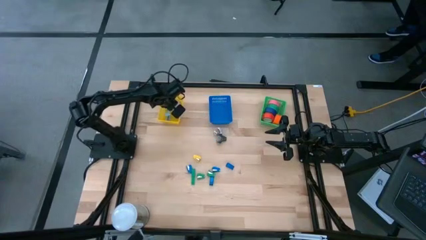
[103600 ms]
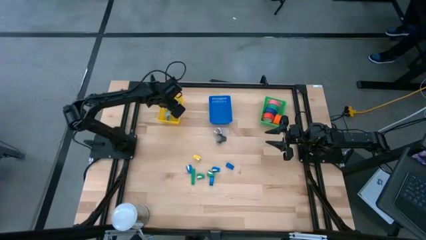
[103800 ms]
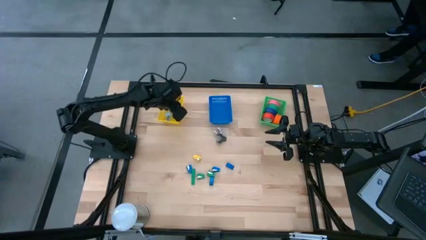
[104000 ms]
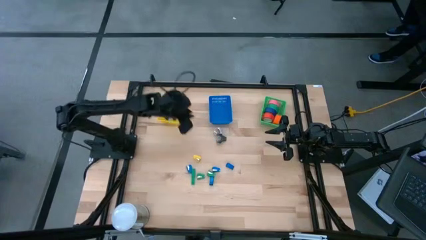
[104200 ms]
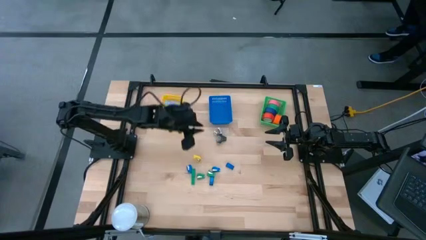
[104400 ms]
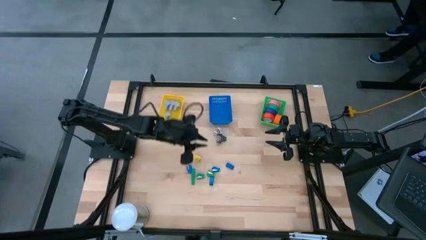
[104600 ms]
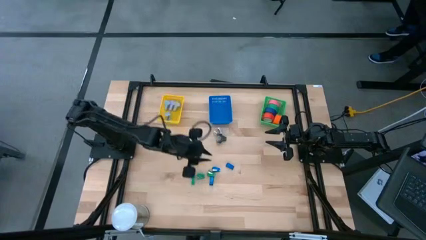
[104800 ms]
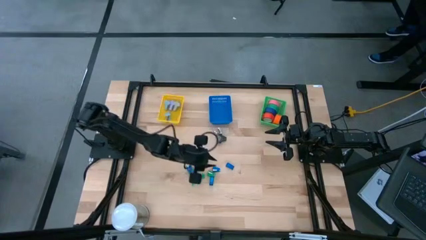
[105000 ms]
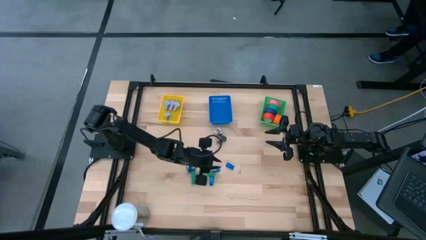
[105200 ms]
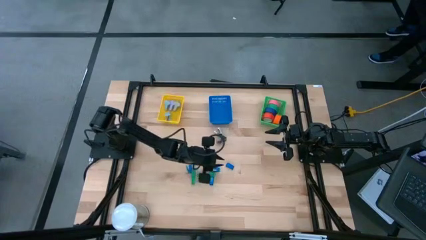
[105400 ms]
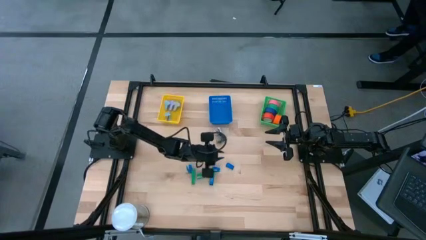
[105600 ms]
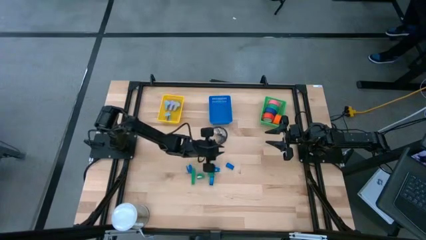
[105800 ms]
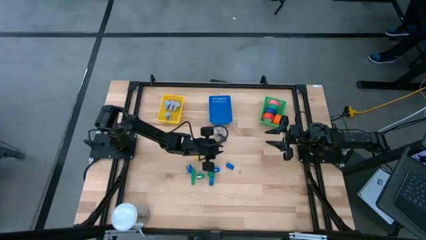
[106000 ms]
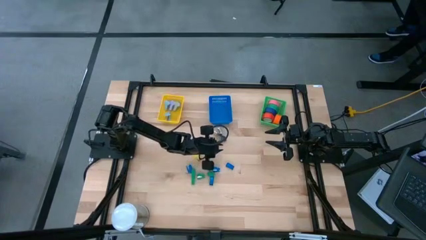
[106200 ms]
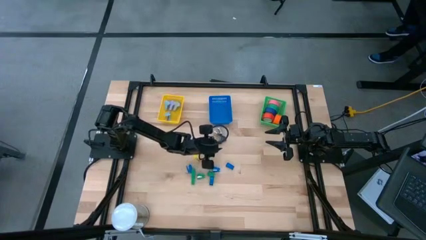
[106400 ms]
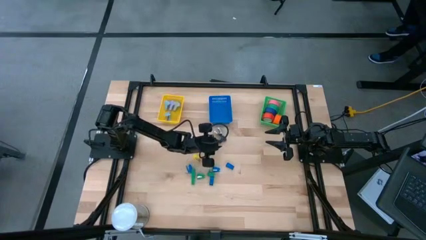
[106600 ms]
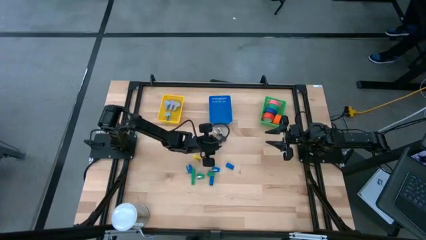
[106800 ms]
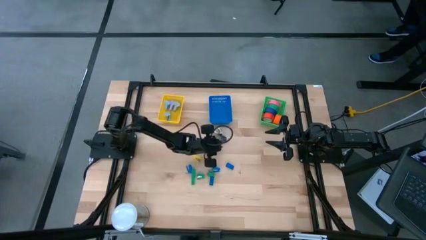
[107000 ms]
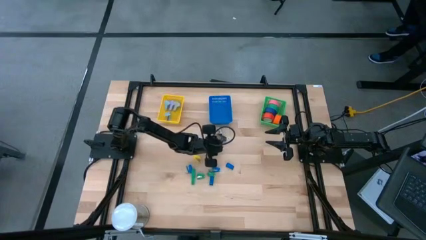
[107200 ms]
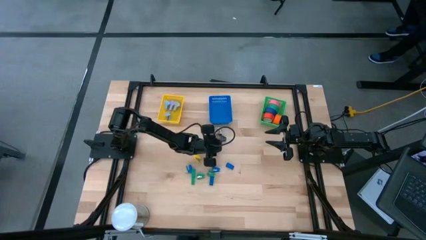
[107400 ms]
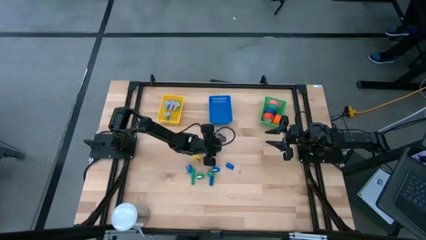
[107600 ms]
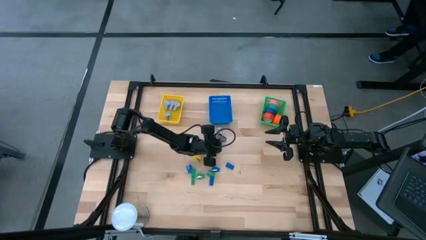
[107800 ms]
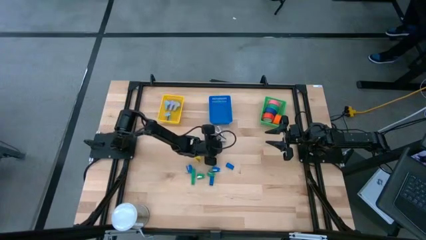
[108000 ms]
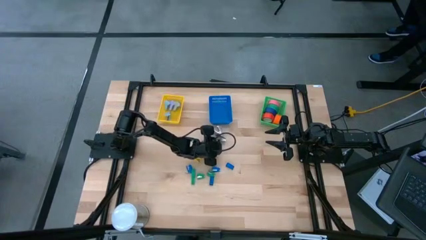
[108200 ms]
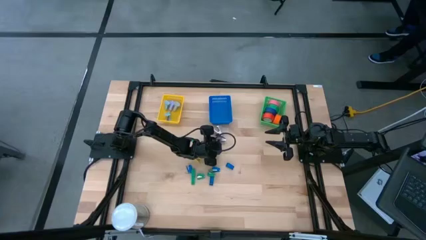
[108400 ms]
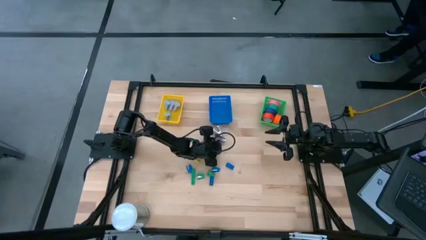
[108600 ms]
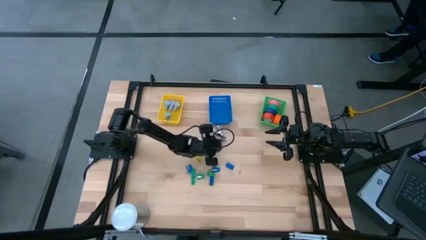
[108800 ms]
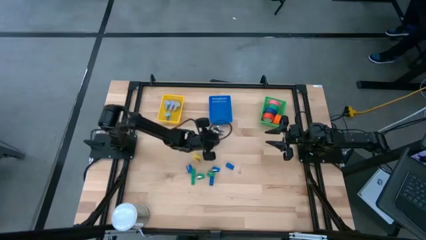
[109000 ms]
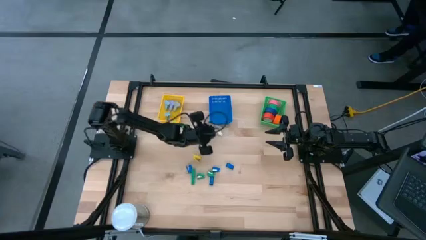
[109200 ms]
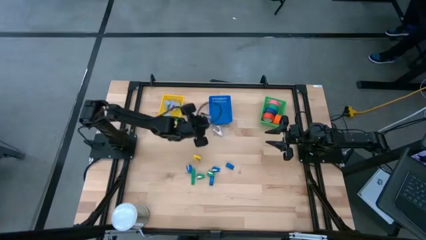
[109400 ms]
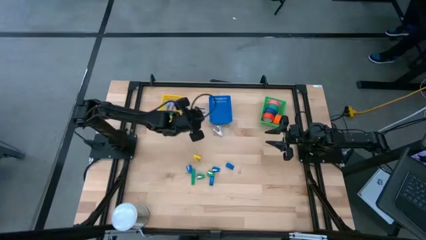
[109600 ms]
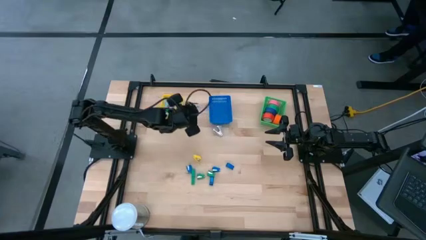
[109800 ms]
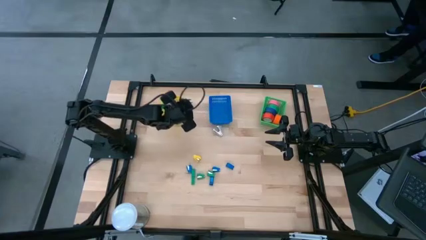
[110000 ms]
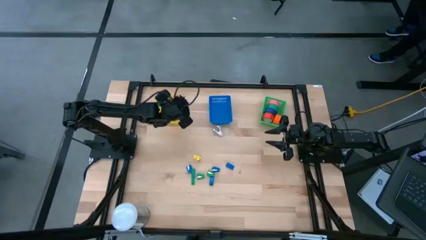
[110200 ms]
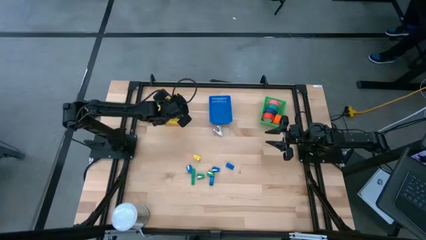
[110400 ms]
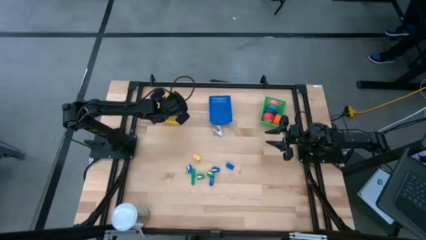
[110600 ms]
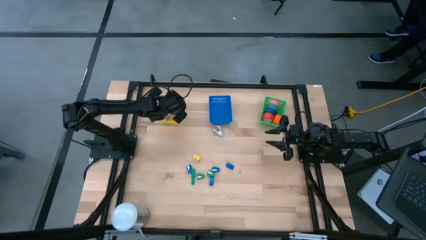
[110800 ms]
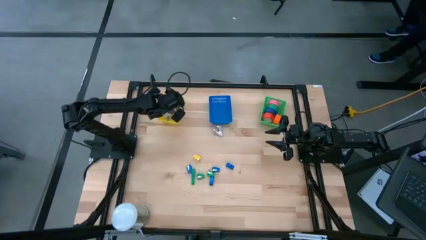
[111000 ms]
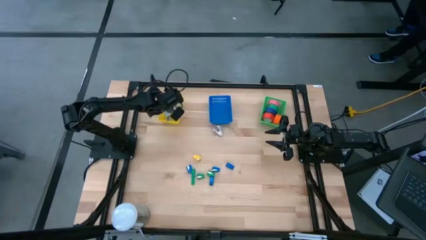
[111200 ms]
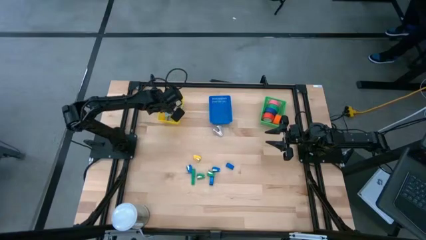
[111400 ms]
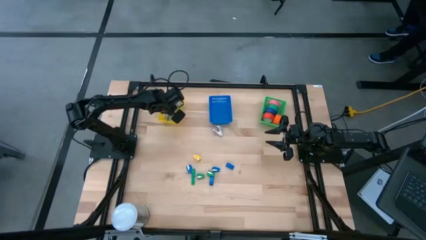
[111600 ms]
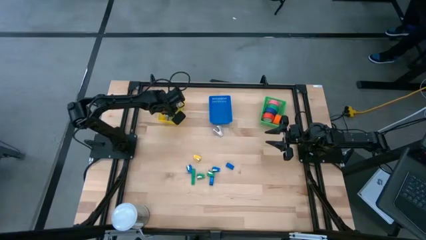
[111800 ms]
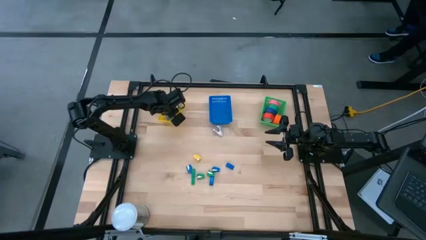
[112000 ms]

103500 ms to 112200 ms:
Task: Pick and place Stapler, Stapler remover, tape
Put the black staple remover into the yellow basket

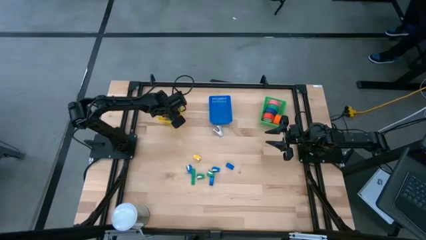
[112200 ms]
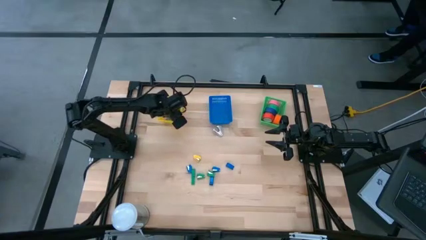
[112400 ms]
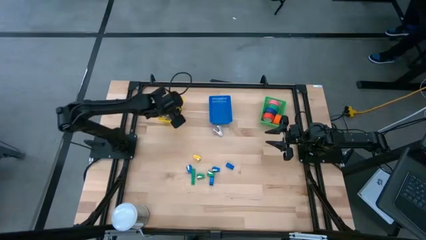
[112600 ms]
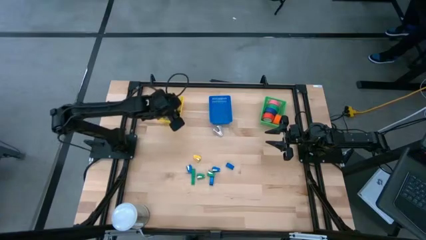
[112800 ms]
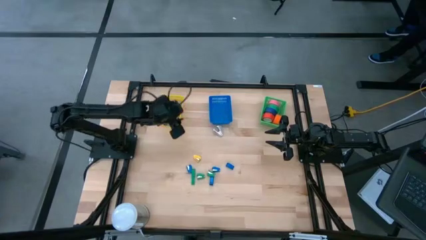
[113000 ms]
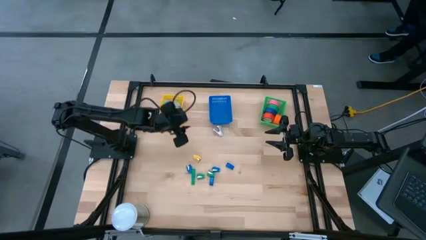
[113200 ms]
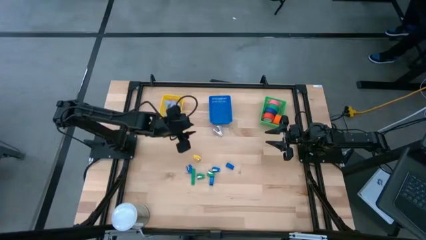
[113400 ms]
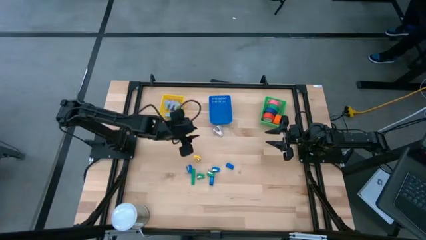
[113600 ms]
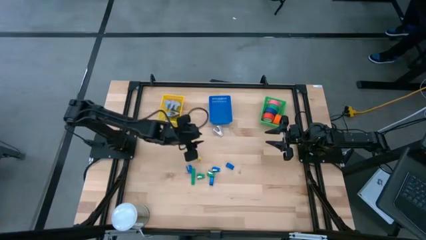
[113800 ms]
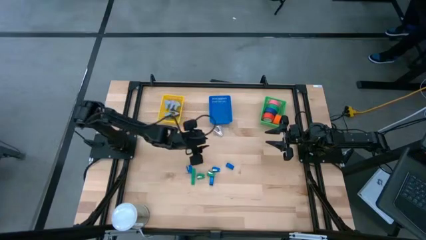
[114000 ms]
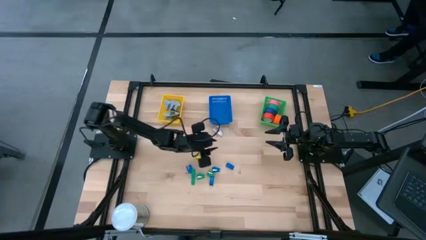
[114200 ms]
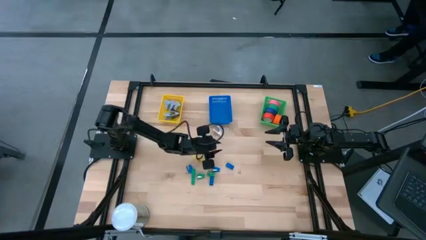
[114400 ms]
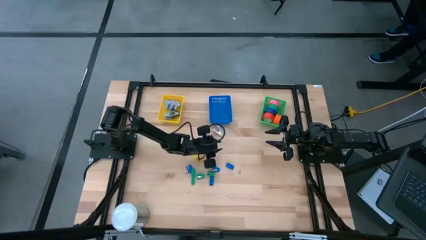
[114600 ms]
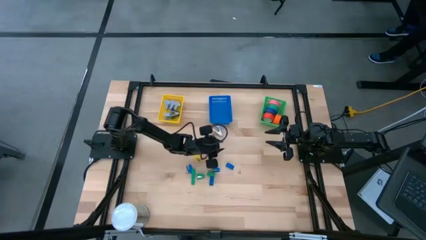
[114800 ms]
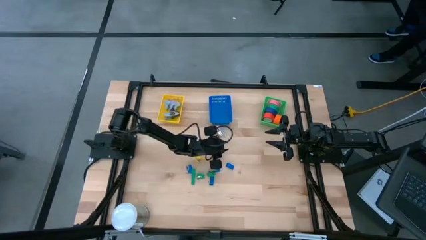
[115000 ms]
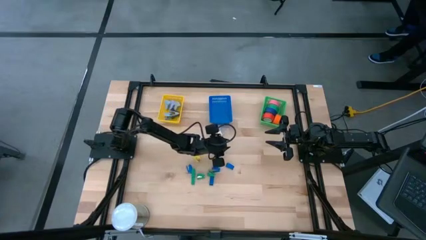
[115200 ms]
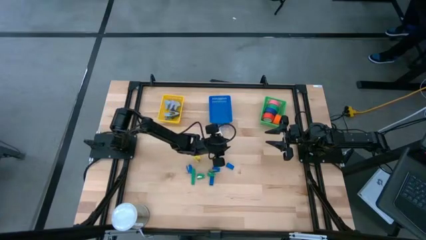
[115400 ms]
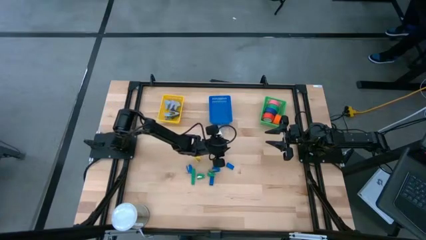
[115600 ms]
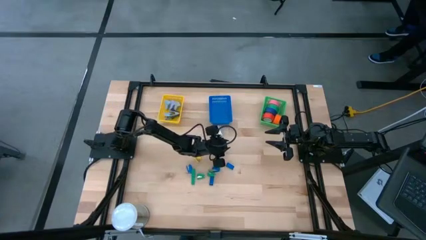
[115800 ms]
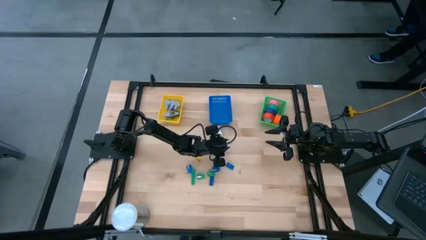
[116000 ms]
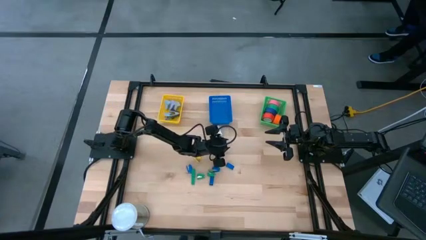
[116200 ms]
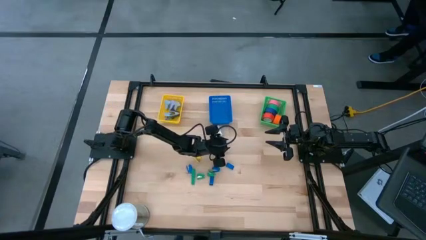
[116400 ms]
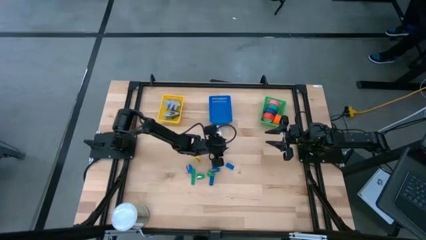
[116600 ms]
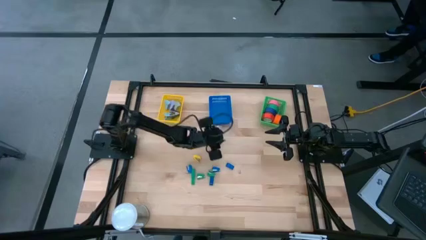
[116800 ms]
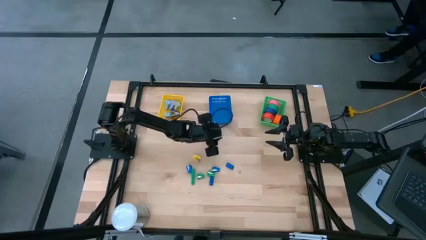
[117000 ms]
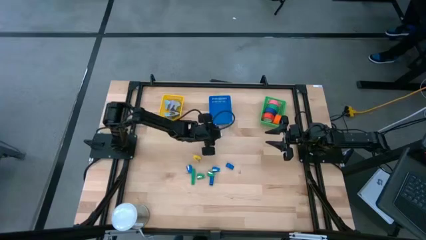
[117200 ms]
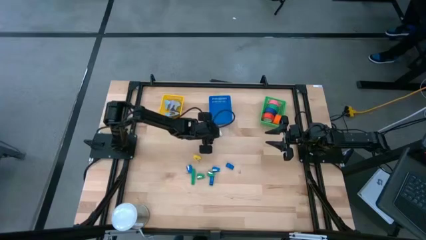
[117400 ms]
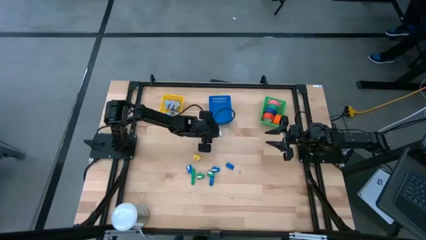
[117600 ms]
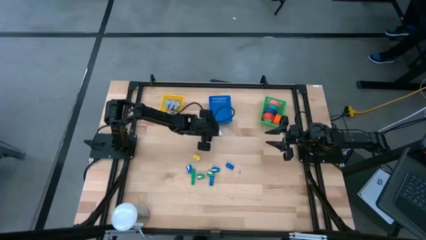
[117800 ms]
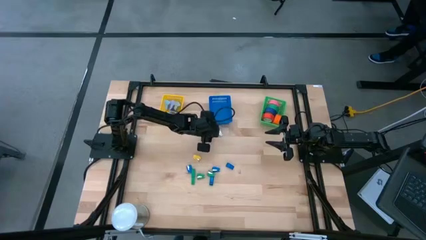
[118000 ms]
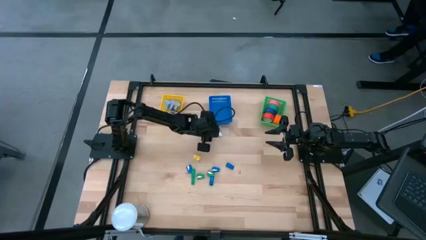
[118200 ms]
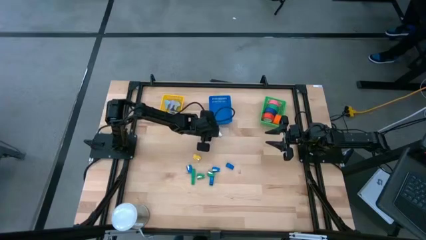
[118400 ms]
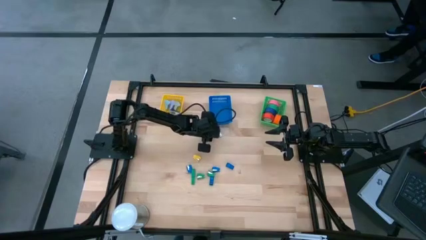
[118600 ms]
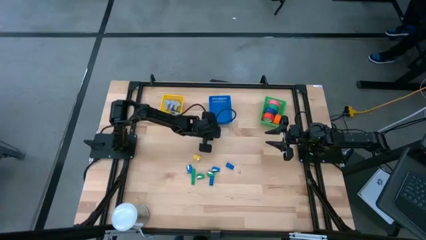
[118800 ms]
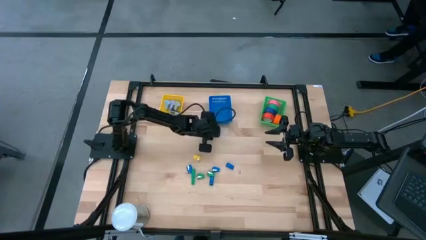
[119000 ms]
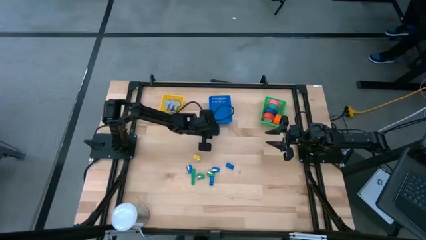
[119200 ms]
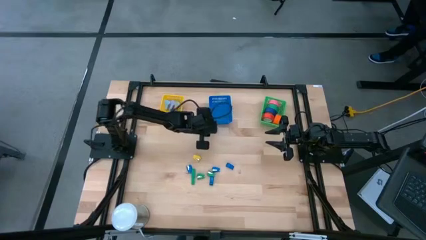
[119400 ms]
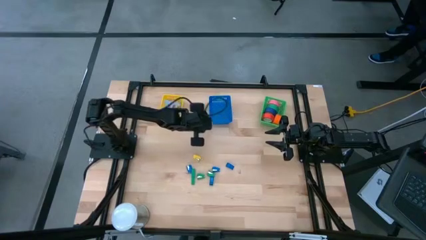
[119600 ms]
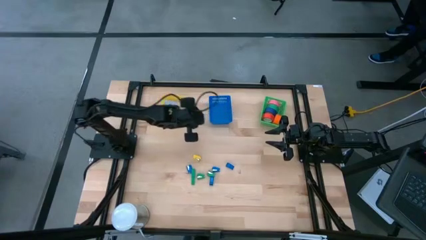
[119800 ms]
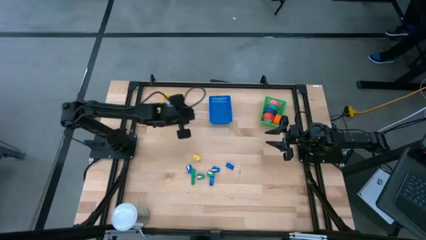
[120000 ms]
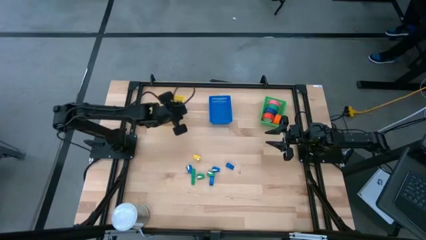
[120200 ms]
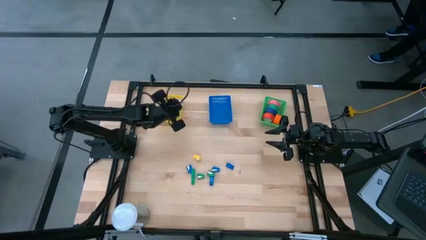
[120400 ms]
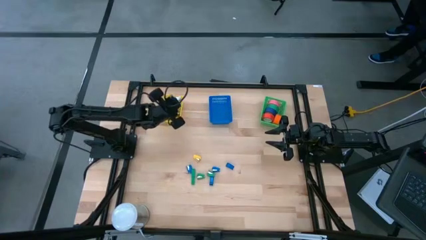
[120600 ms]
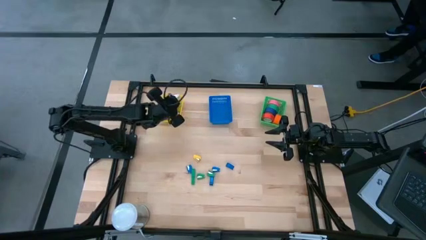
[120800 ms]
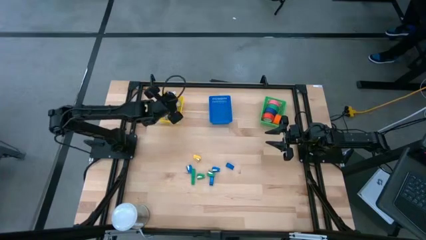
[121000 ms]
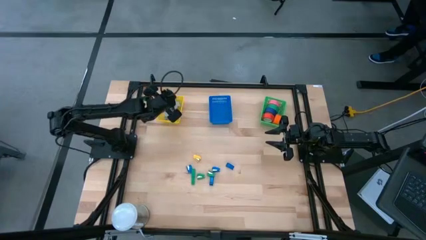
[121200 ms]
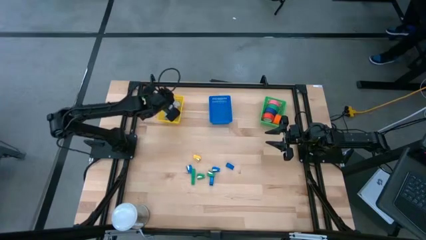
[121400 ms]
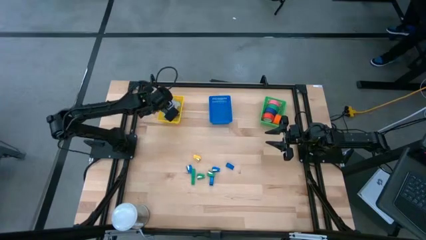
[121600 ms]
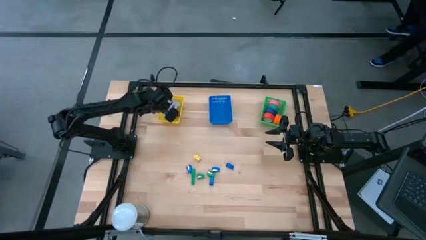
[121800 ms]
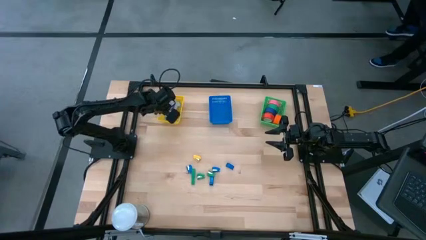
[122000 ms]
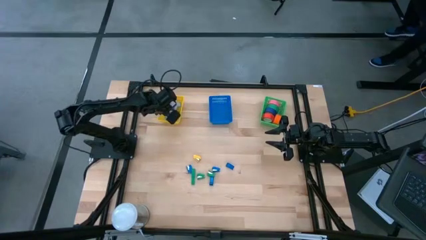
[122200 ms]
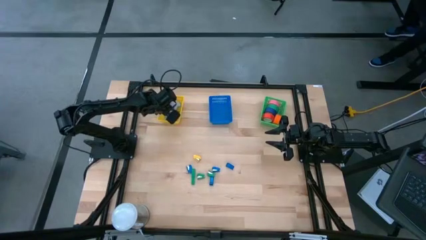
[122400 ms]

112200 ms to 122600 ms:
Put the gray staple remover into the yellow basket
